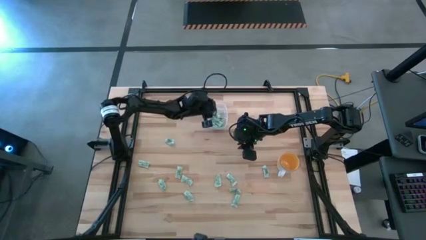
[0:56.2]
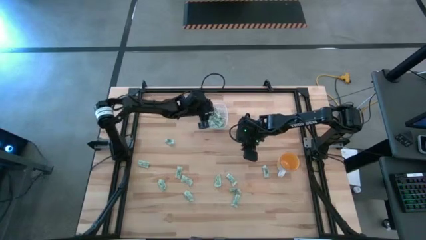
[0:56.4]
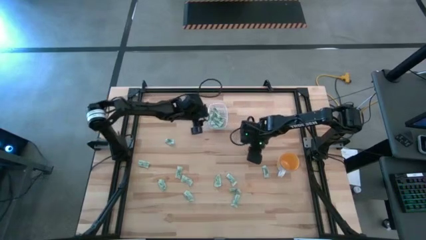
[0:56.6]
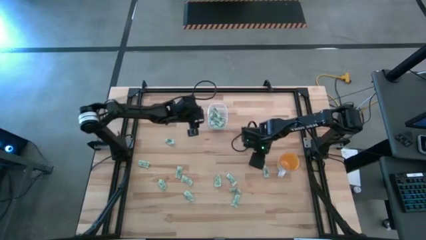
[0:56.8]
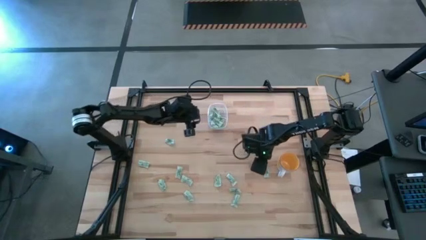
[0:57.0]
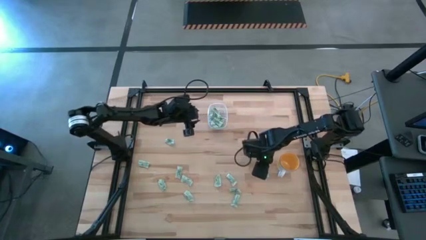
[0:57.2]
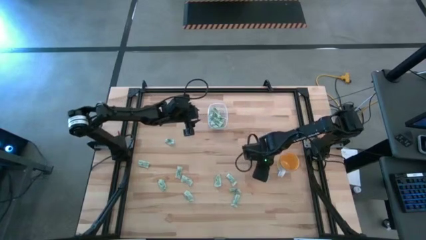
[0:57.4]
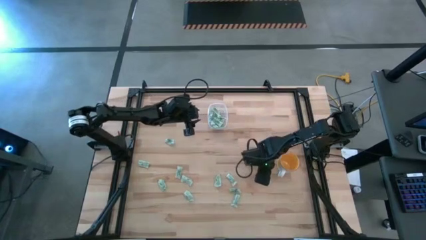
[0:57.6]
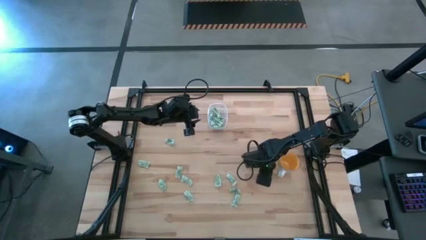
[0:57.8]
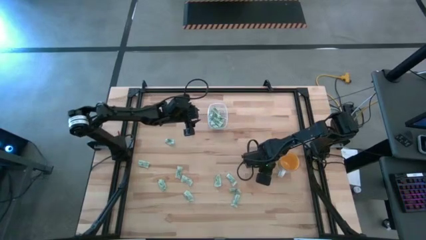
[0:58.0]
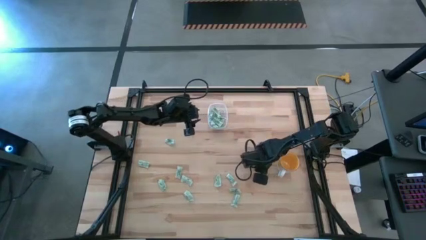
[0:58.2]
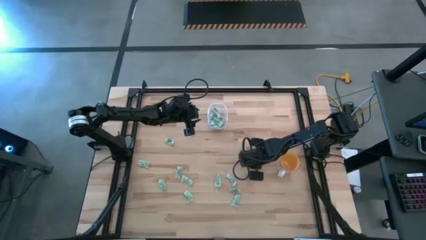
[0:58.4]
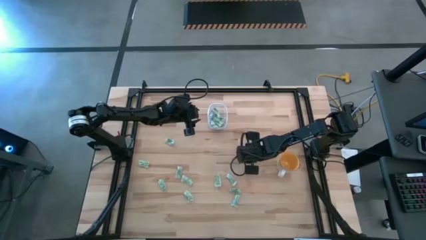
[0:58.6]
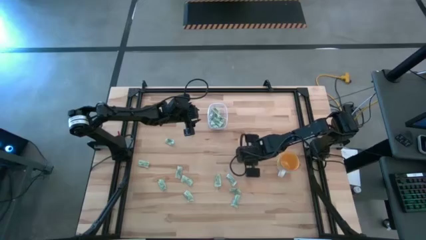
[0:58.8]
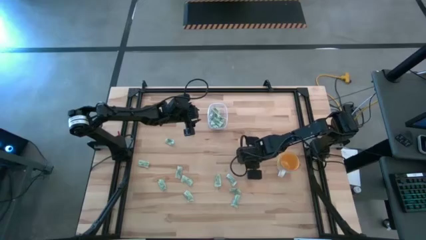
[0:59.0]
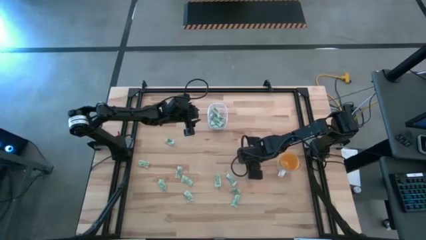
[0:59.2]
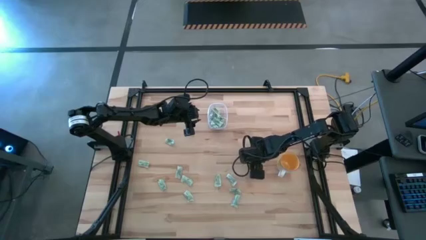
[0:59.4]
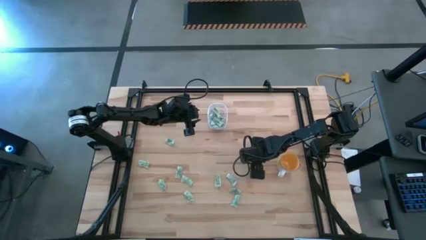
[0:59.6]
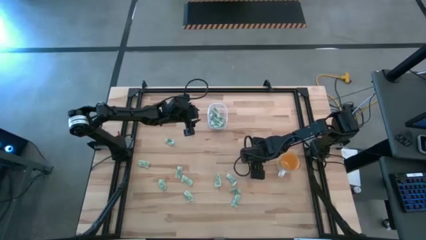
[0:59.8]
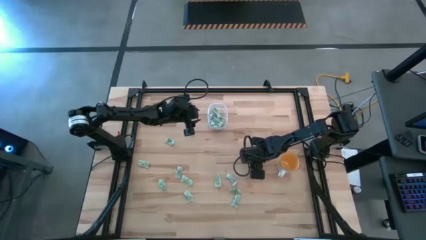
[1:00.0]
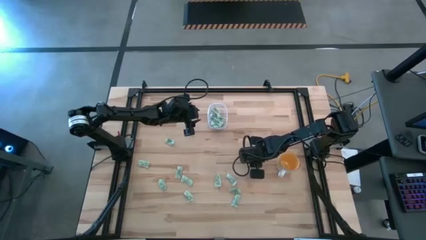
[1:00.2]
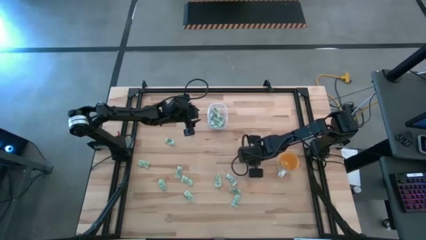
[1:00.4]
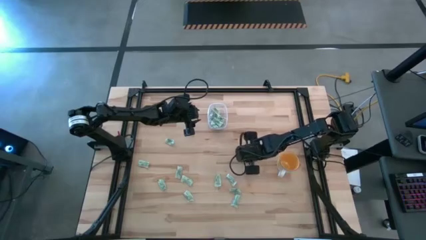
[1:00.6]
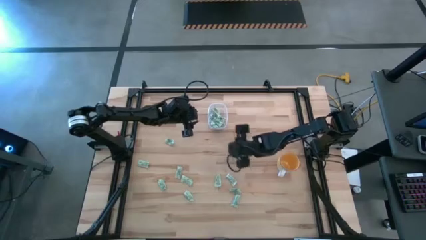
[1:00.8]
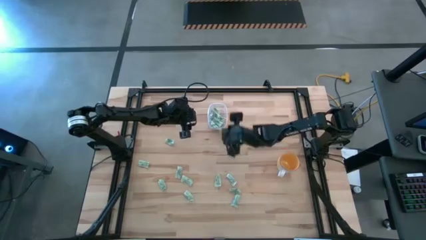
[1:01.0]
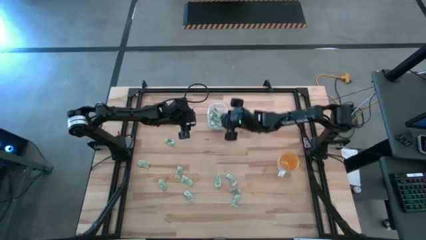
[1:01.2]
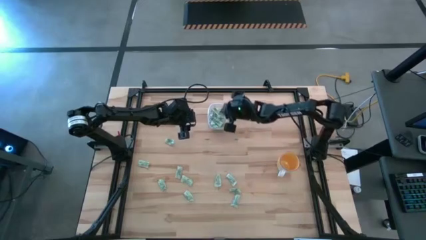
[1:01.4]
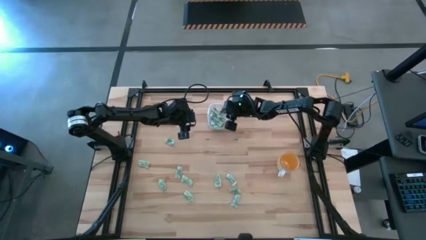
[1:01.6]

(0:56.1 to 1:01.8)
Task: Pick and place Stevia / Truvia into bins
Put the green stevia packet into the transparent bin

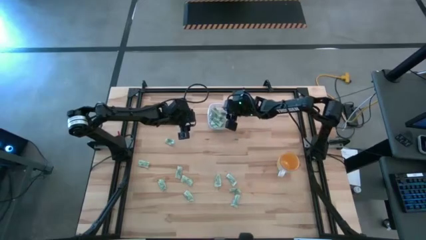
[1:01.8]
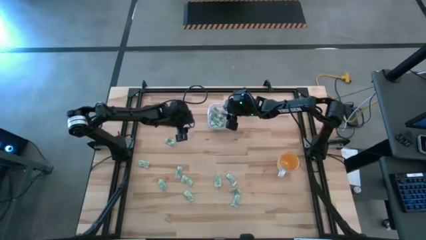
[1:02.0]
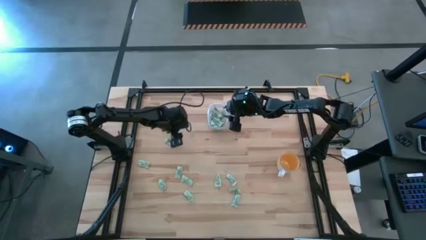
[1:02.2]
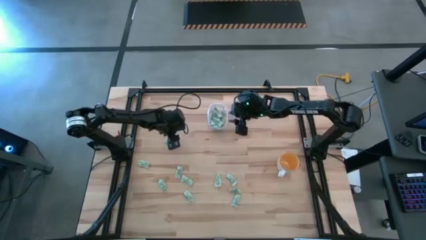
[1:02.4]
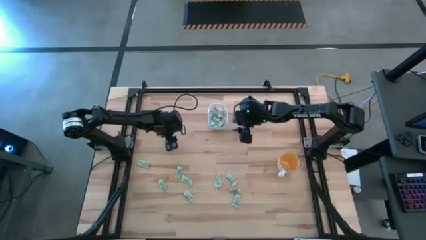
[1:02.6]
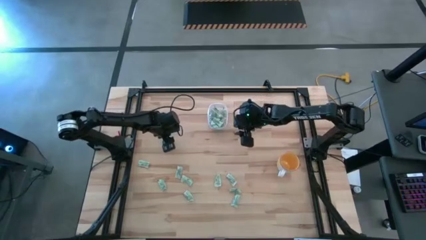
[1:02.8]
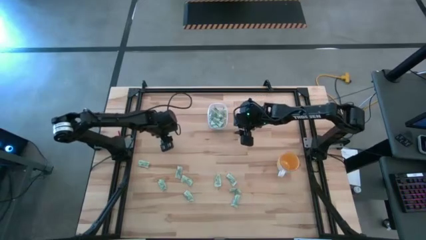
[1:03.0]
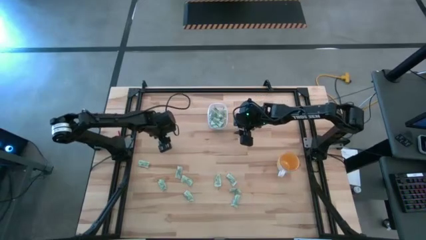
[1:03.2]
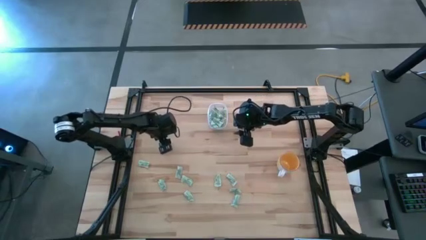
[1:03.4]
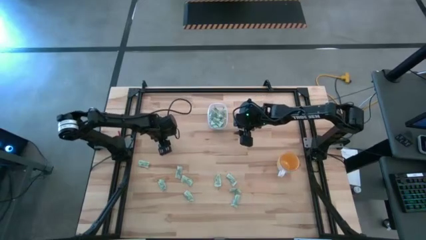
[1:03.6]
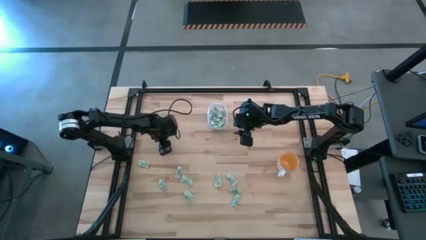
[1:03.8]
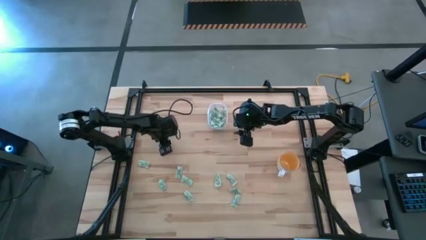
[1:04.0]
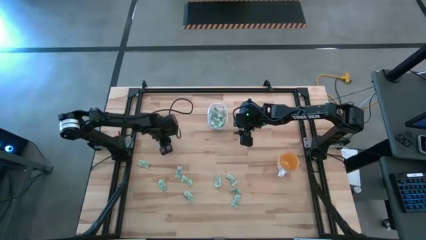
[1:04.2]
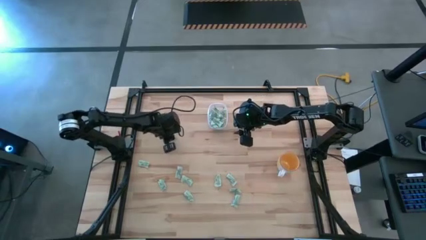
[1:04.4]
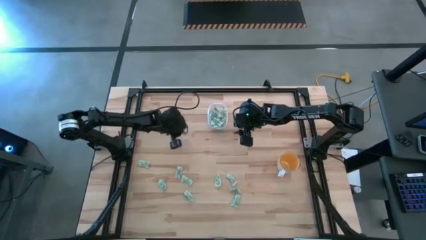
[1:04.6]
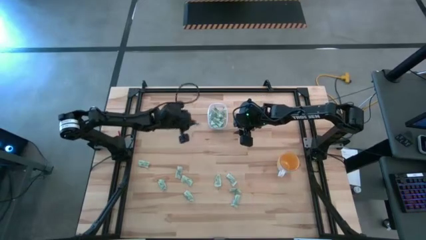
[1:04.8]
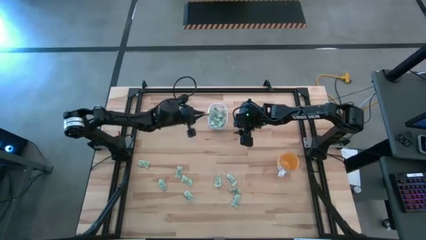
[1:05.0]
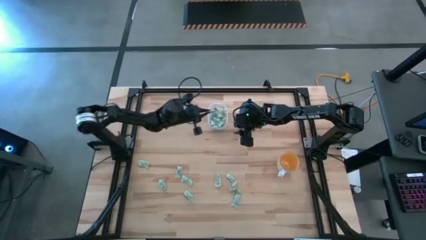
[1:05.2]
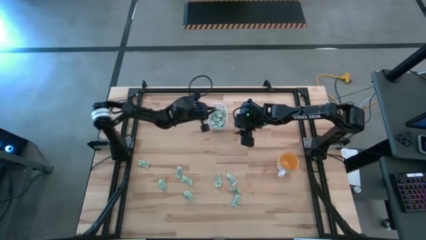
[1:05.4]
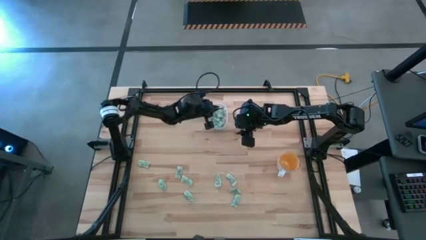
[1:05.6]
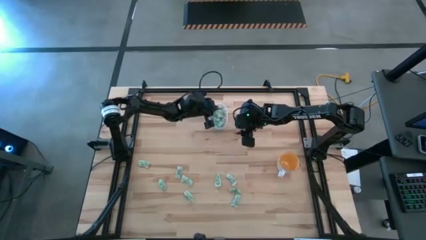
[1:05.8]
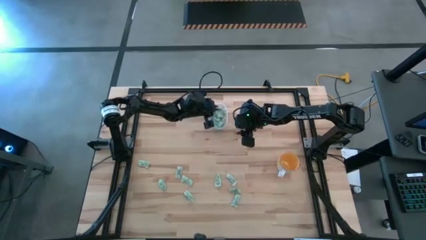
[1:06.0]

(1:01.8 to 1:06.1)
Put the green stevia packet into the transparent bin

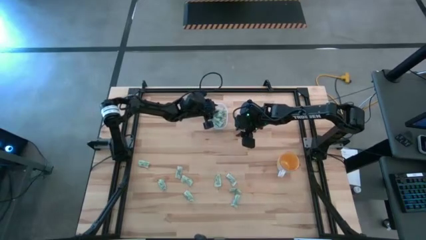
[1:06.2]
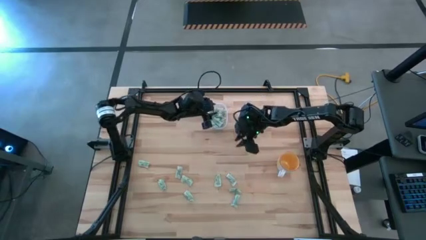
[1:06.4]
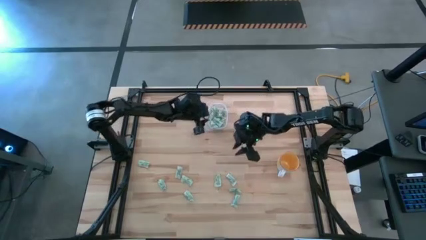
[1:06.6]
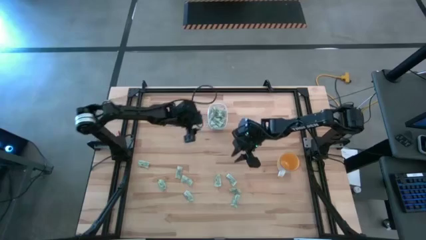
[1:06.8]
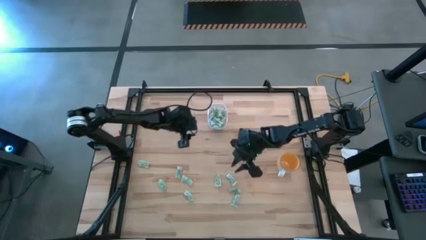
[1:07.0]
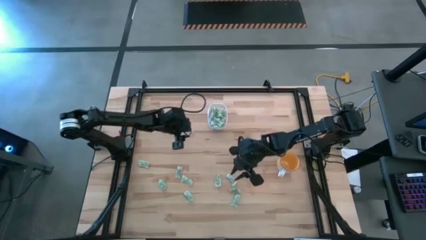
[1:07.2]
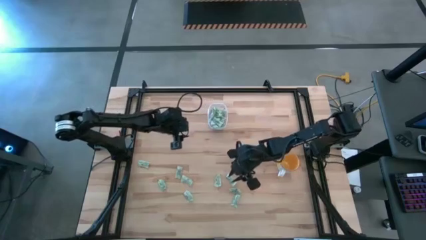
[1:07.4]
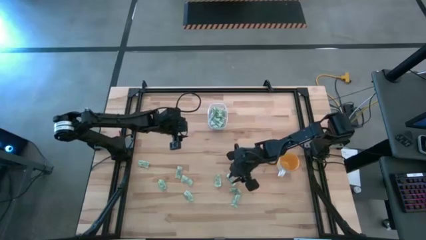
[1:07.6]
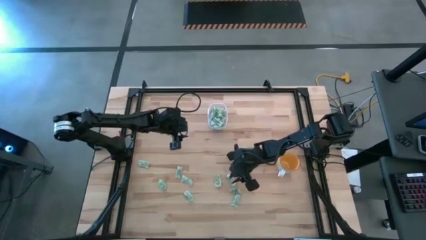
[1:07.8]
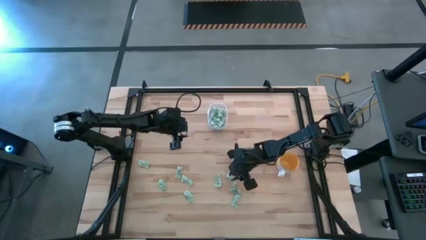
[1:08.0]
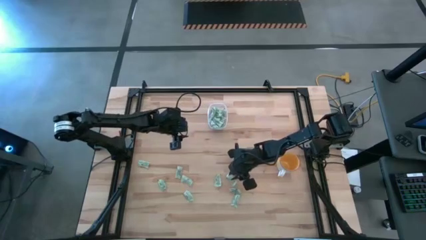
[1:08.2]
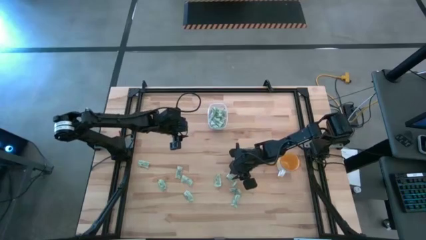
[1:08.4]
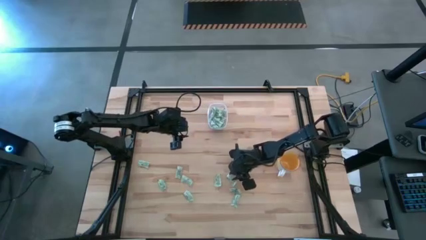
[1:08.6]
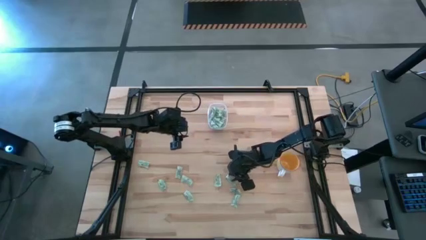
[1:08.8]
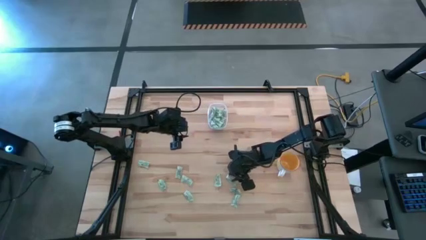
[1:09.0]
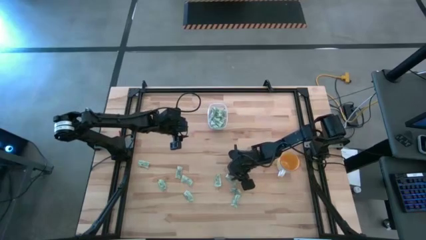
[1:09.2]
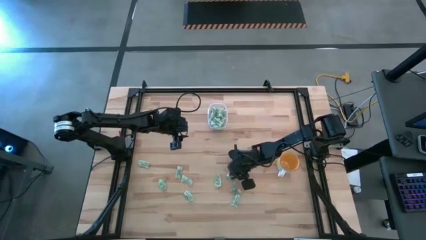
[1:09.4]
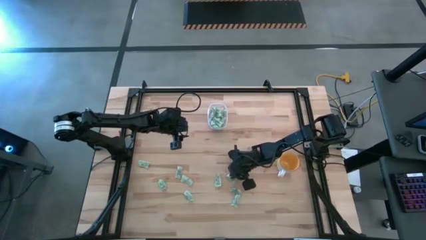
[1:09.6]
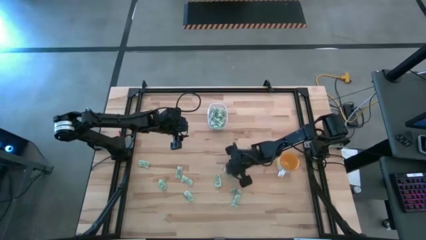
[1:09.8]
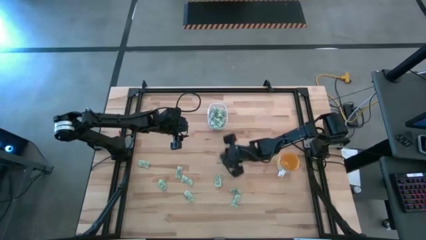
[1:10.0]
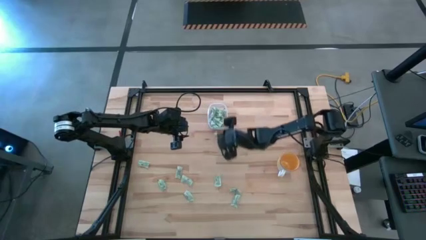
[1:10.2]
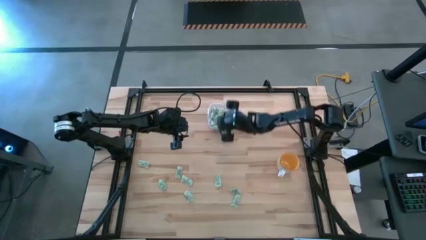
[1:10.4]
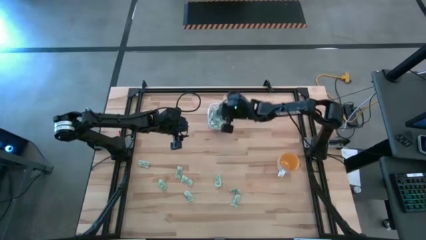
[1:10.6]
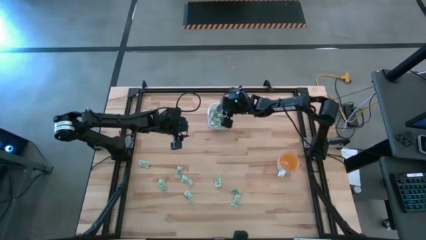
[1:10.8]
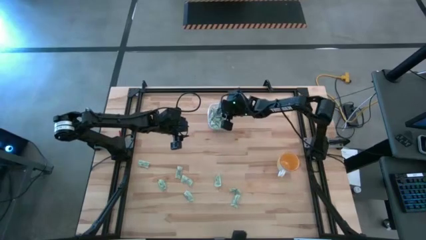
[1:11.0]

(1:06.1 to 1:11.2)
Put the green stevia packet into the transparent bin

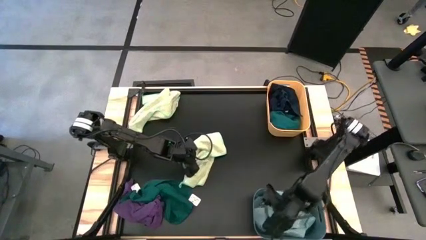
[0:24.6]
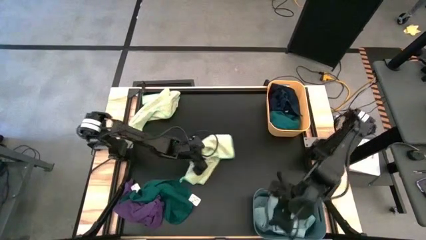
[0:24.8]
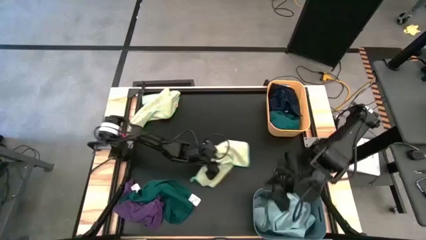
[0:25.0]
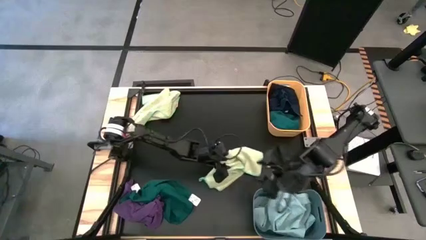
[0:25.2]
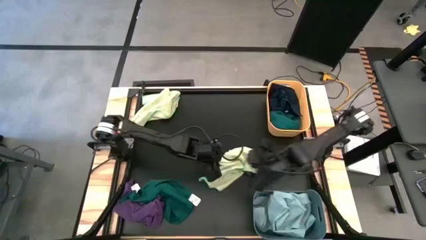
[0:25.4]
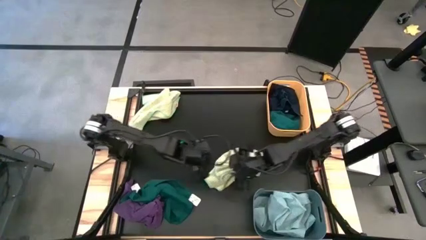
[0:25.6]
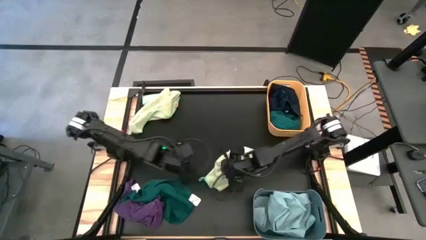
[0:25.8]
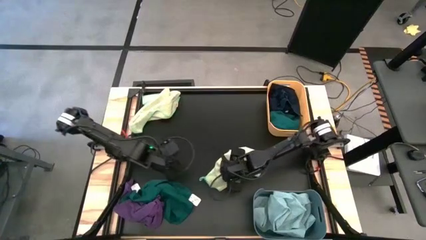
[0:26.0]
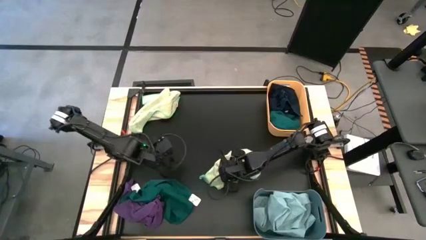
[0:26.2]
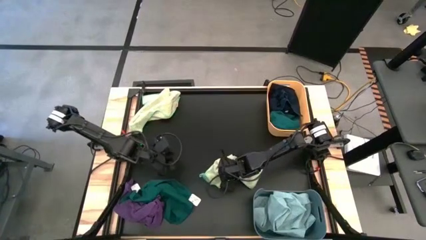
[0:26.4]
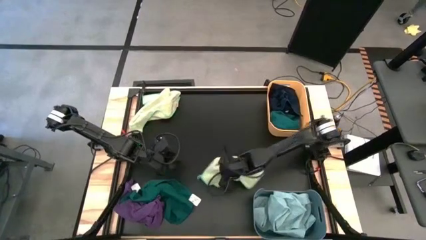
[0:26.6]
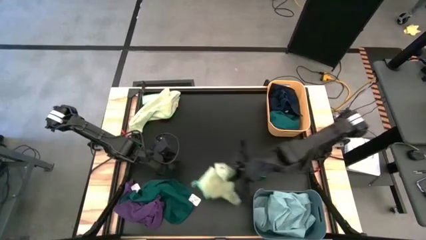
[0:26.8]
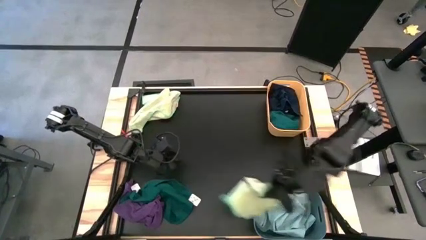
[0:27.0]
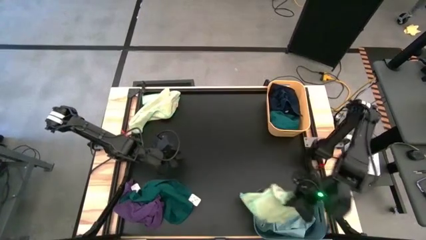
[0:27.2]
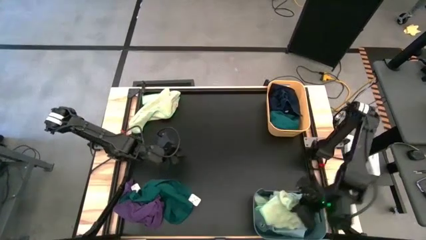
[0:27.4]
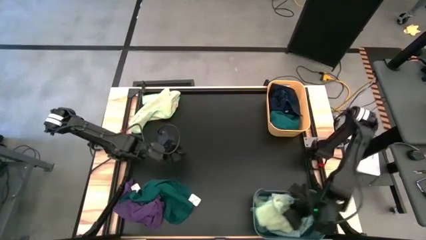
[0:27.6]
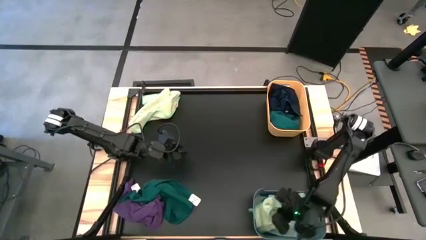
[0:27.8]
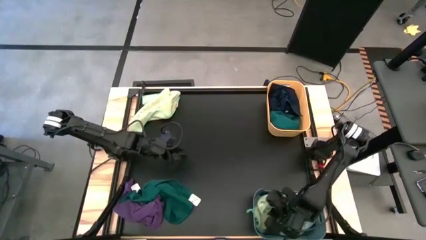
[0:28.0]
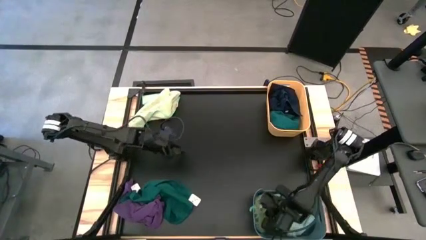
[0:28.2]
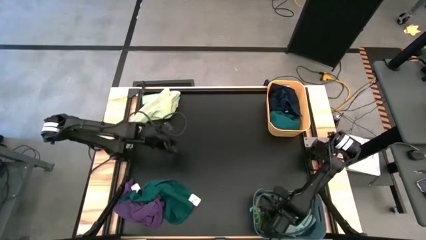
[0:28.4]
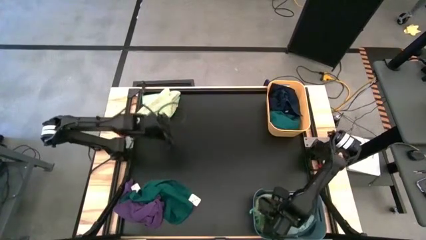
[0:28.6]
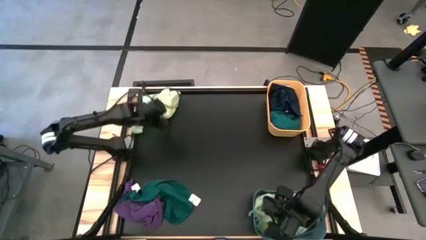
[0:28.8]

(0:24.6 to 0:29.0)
Task: Sort towels by color in basket
Put the light green towel into the blue bin
